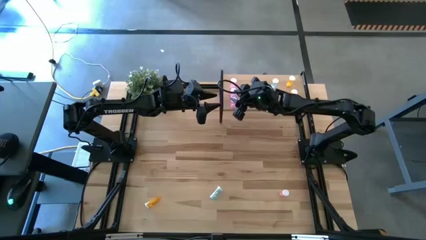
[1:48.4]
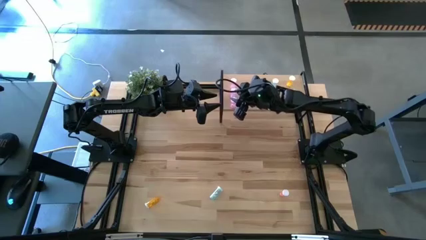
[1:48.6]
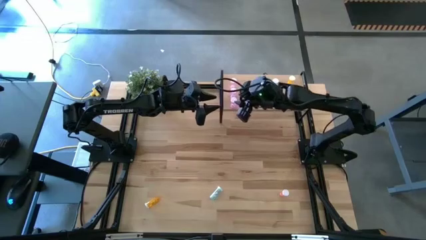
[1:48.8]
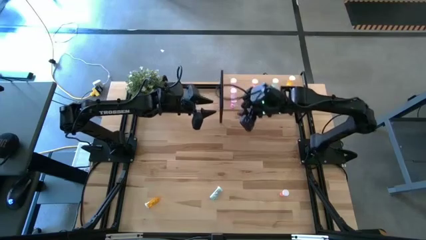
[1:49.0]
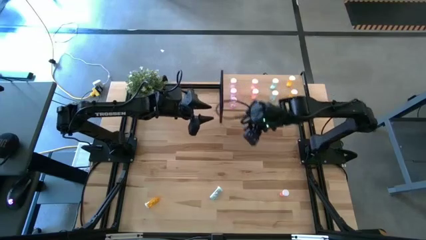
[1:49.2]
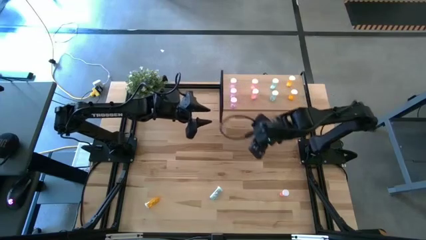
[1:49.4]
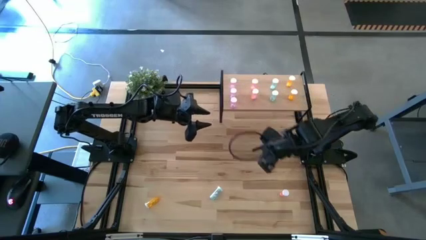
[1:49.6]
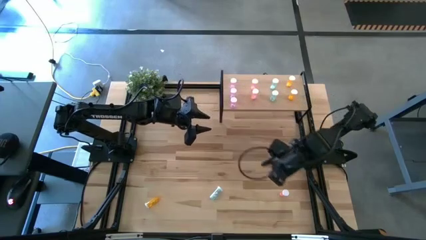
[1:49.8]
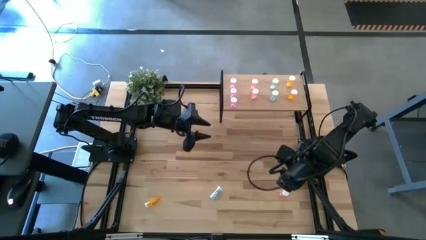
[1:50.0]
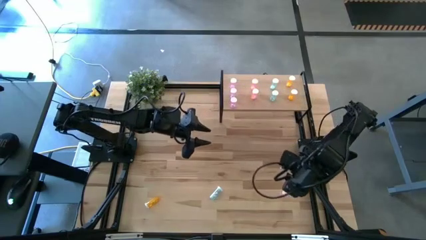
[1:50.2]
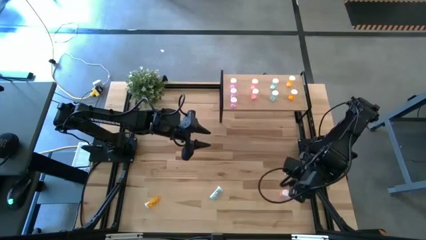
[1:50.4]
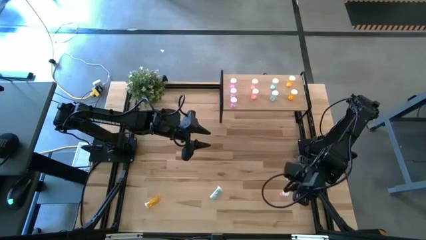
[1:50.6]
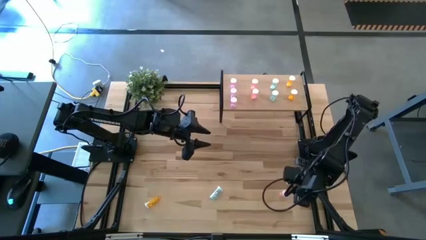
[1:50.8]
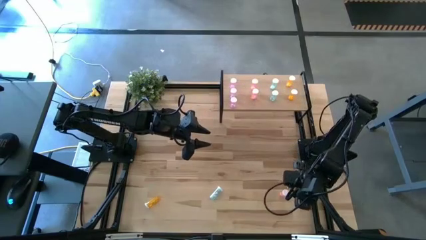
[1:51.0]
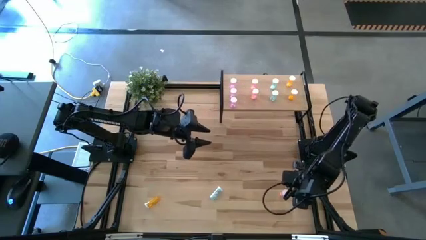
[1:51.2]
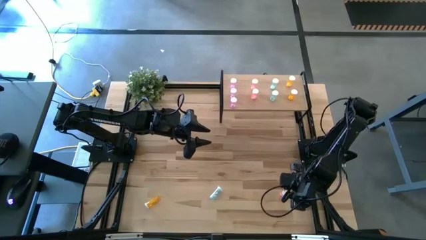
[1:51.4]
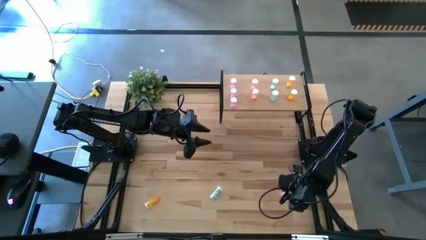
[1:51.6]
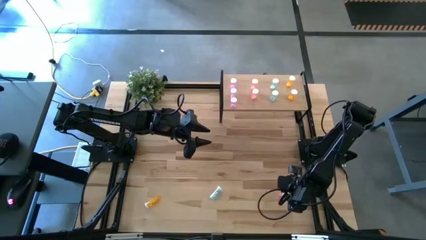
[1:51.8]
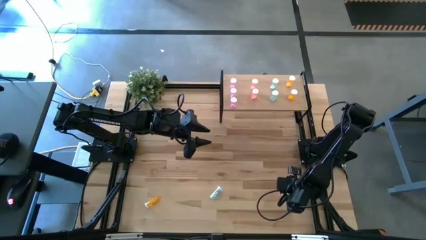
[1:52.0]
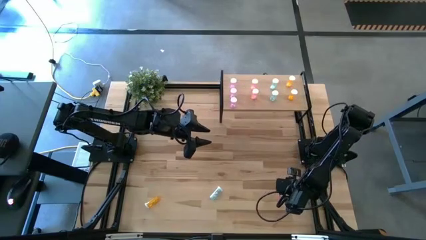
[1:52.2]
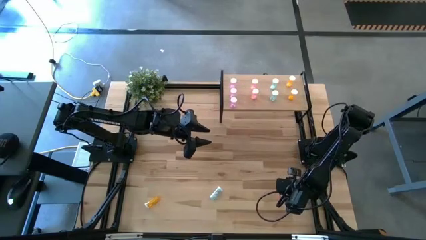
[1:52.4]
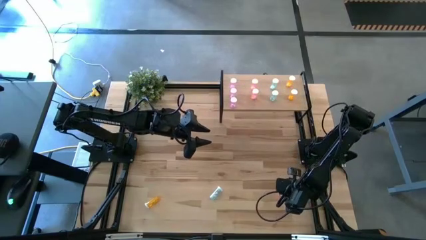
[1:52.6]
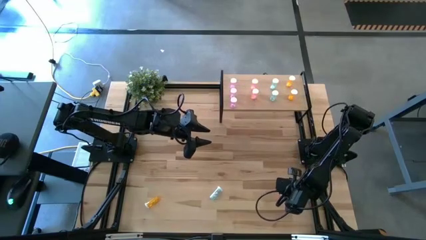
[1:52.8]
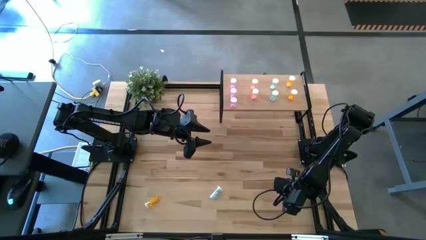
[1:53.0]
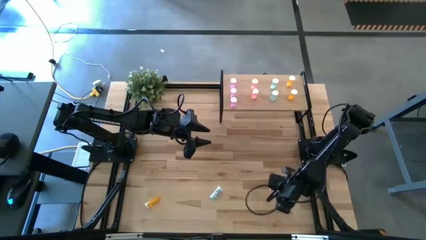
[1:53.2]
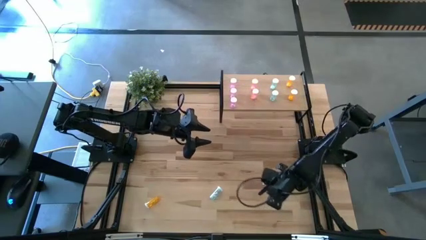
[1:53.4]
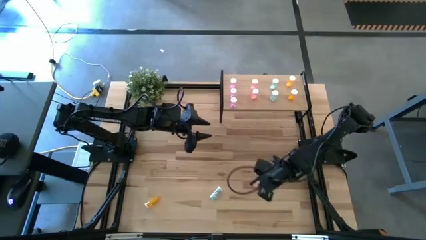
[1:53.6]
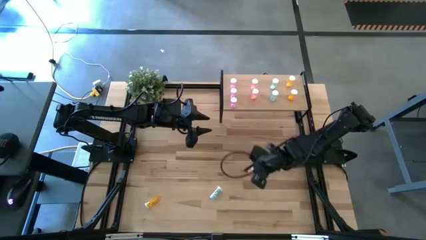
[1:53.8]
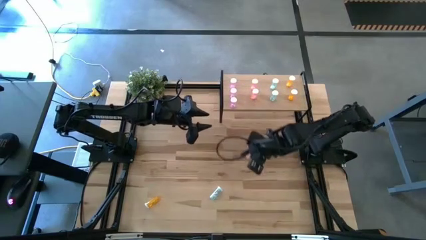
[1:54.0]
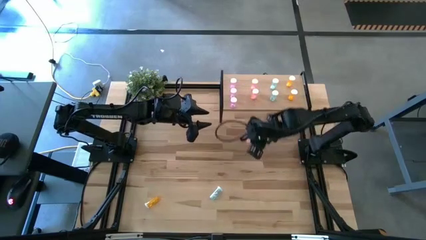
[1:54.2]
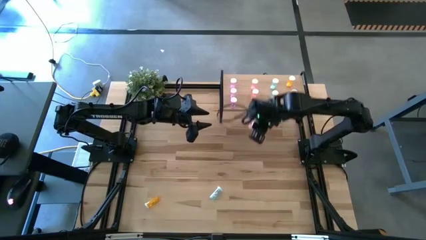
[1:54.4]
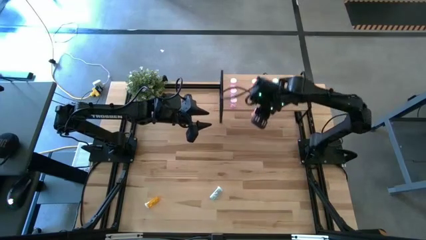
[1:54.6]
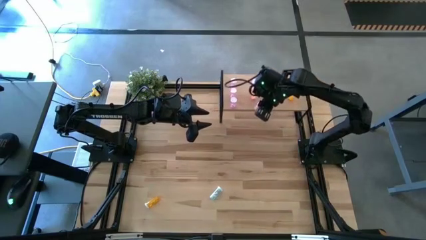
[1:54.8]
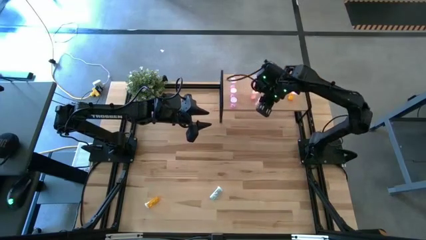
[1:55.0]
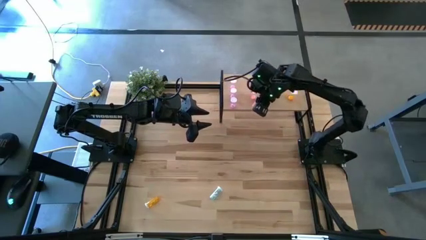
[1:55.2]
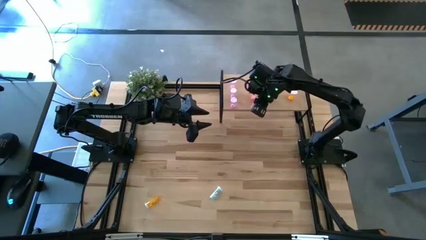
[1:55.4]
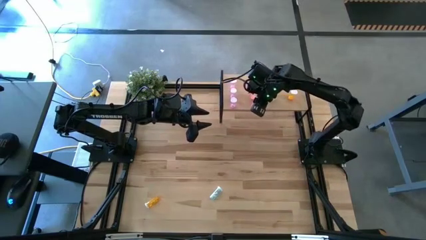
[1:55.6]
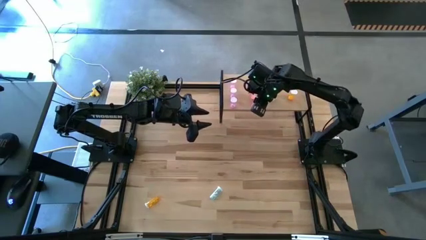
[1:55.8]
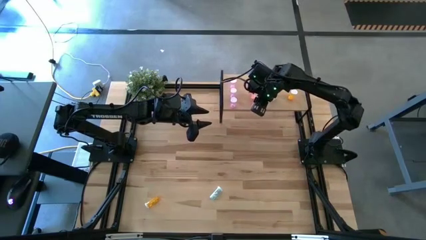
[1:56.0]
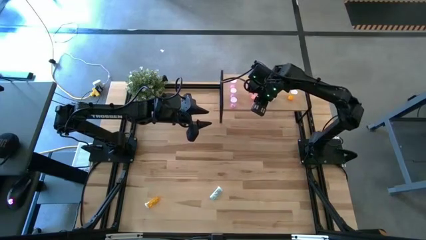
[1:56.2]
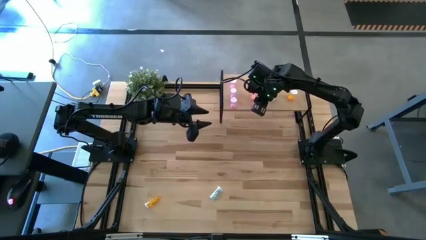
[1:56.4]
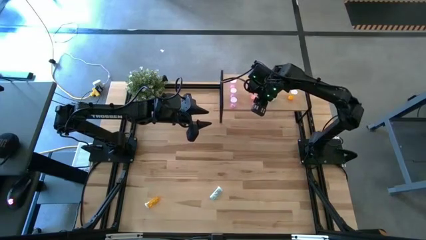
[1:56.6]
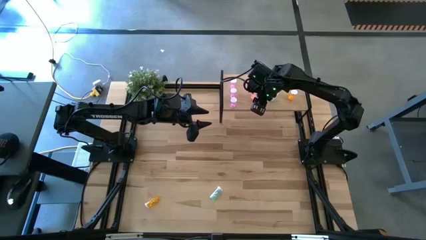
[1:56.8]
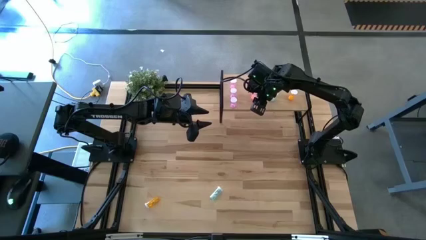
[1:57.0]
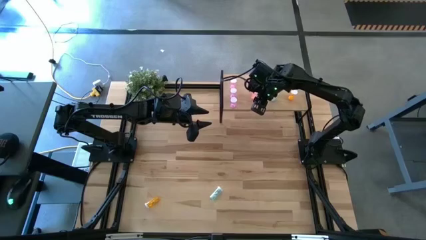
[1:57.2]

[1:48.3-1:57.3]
Task: Pick and place medicine bottles onto shelf by color
Put the red pill bottle on the shelf aligned with the other red pill bottles

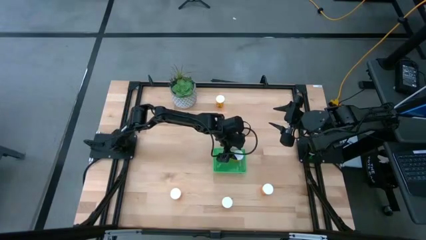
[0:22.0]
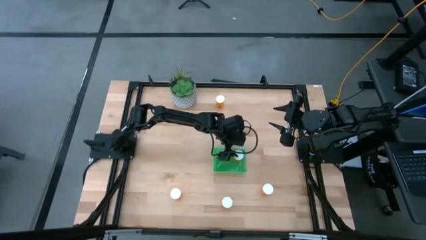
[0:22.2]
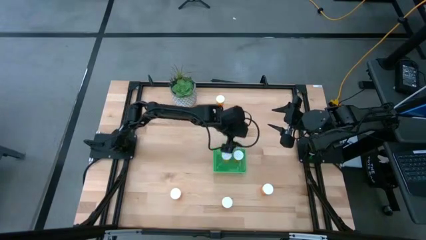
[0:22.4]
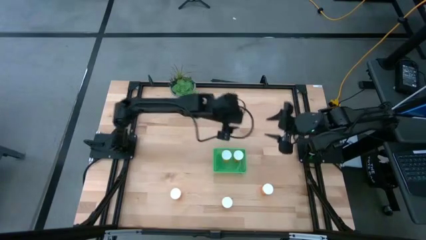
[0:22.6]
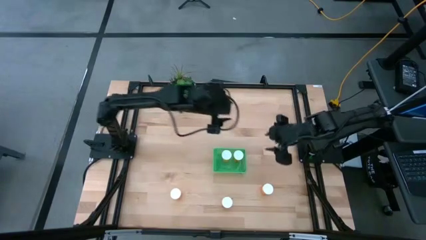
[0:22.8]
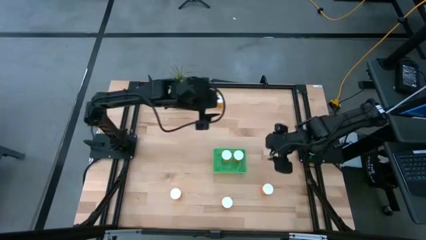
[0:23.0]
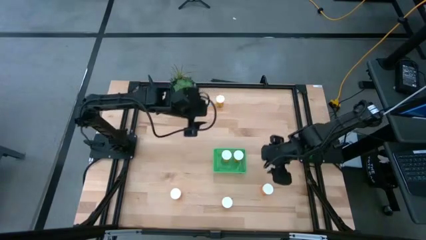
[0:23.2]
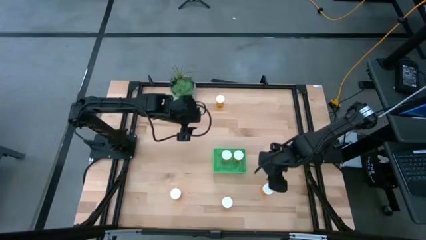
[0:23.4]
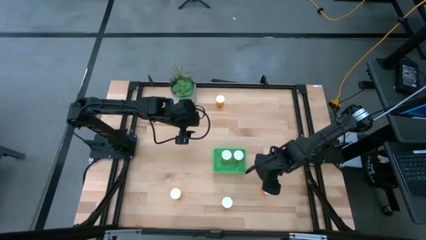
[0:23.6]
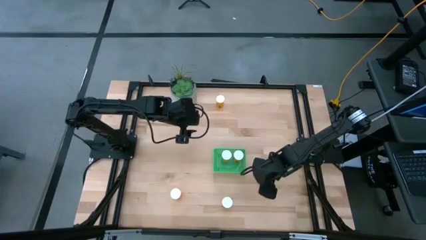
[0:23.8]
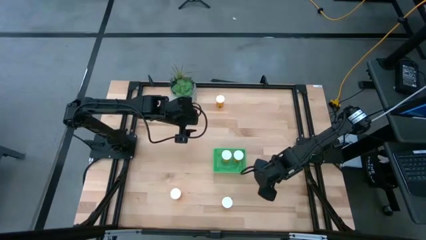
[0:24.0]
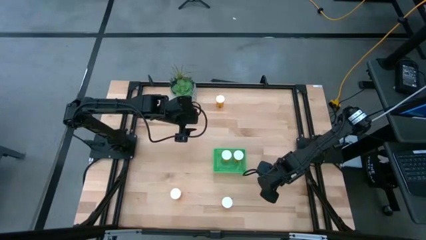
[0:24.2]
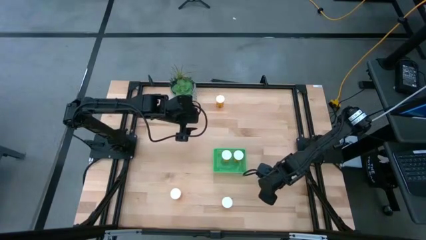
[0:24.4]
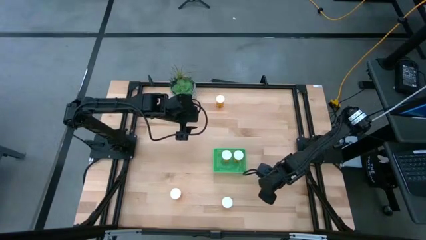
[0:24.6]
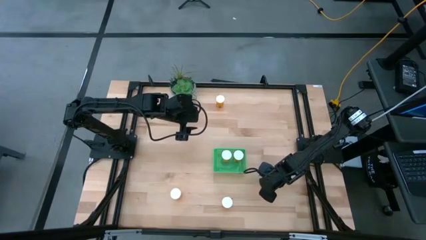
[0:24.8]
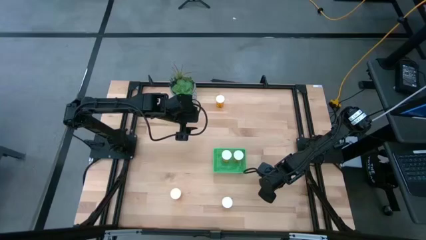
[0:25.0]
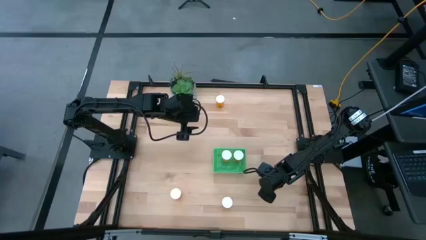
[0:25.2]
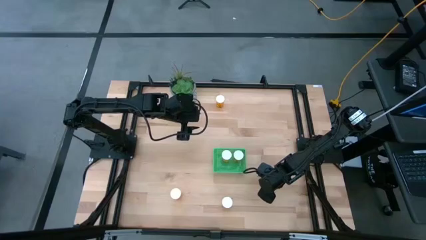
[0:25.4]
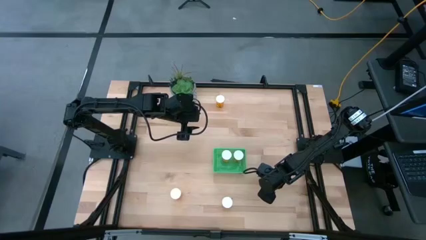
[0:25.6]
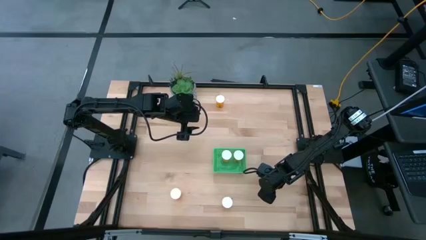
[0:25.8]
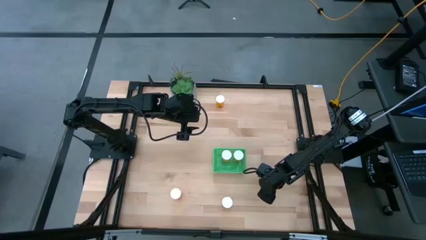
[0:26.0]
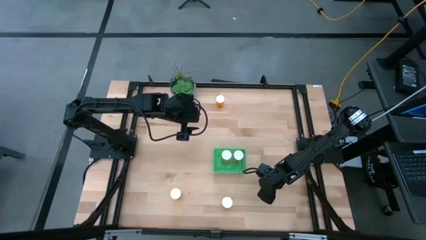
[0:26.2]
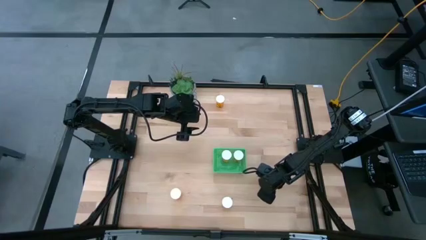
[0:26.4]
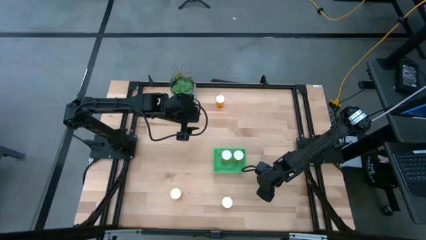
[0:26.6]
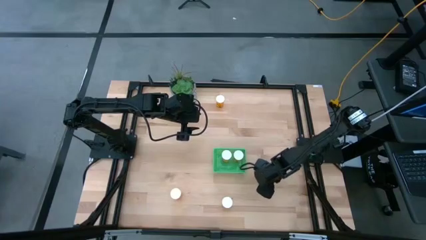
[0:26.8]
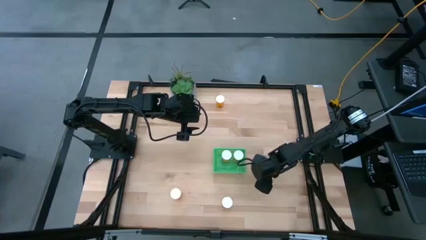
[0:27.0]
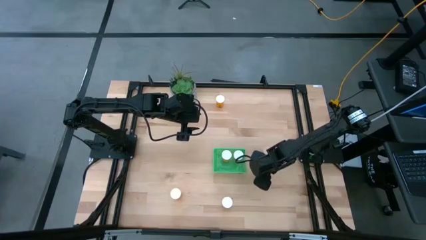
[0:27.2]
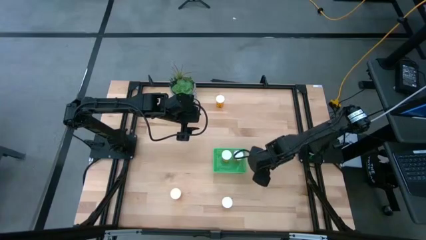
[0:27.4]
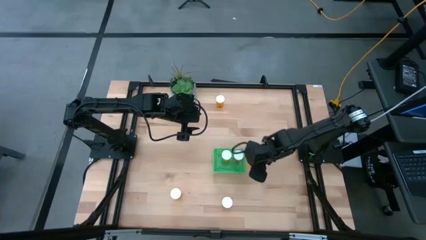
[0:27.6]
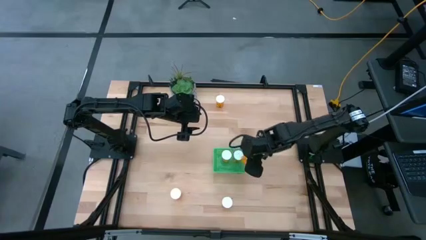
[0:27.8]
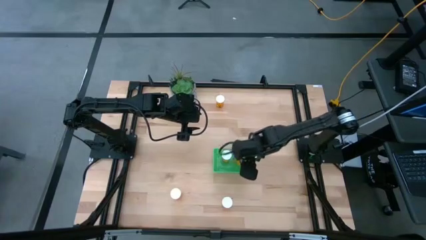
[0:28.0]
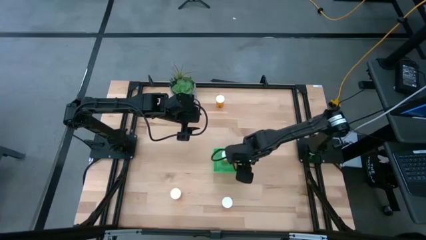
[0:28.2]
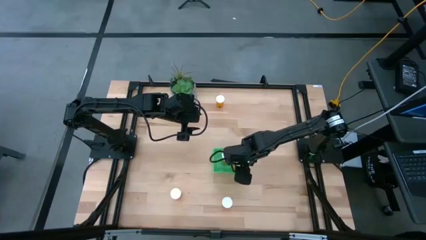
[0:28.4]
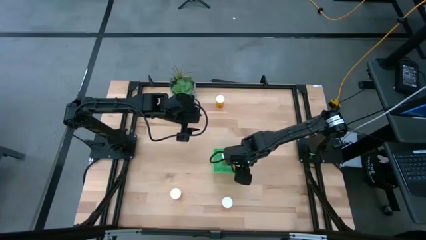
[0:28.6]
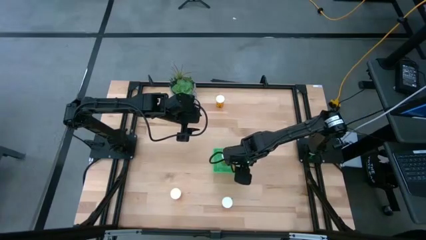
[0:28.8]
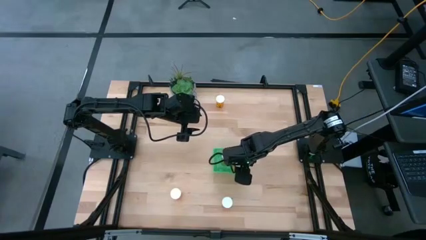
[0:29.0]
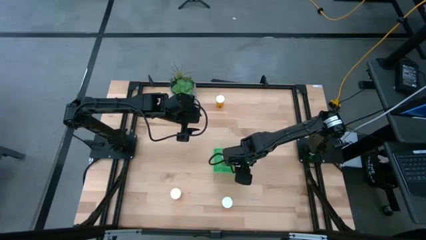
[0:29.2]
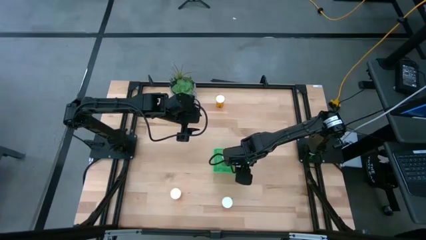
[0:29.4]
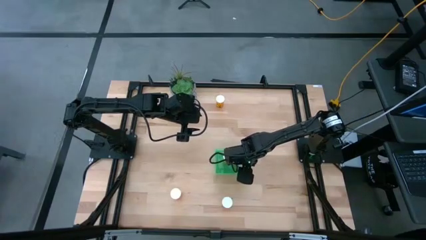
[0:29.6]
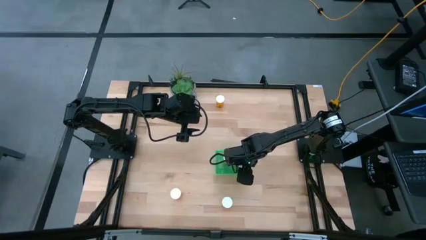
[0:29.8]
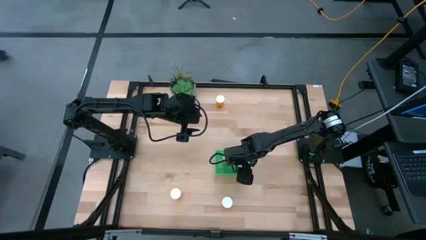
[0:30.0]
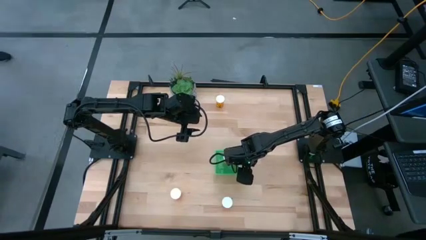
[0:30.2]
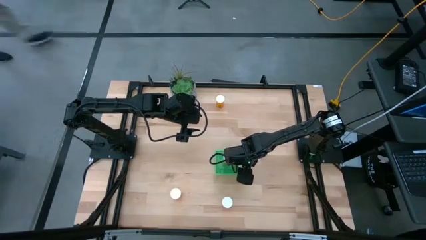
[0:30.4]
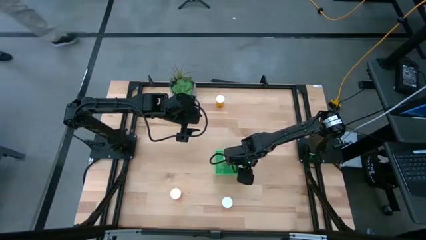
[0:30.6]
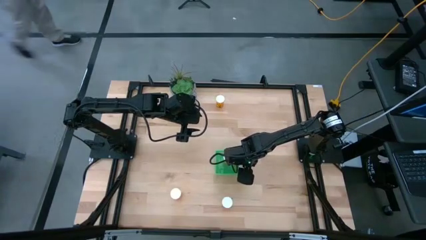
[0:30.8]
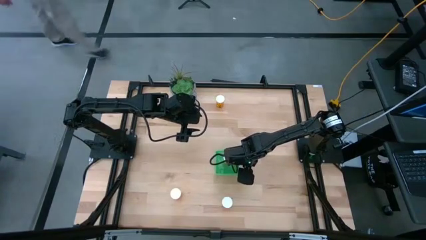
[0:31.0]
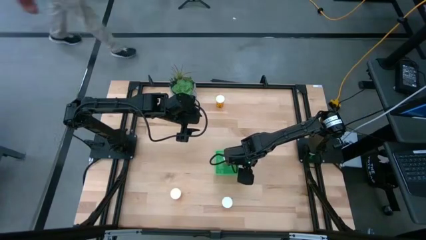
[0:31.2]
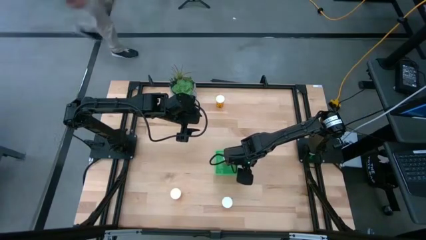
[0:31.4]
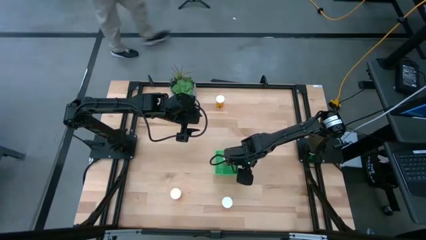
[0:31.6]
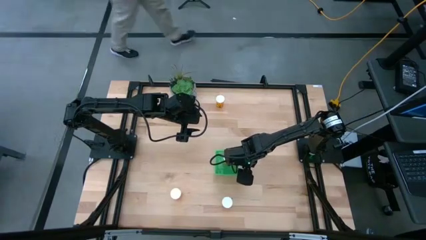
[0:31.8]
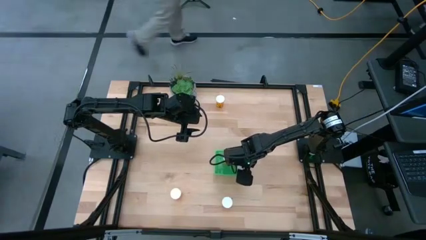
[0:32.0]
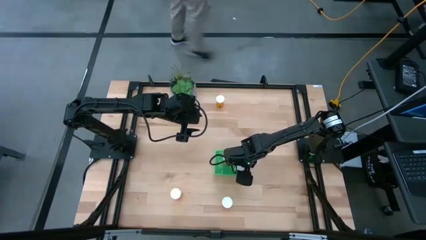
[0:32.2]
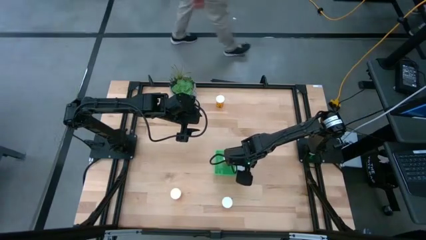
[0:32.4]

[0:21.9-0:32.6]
Task: Pick and place pill bottles into a basket
Put the orange pill bottle into the green bin
